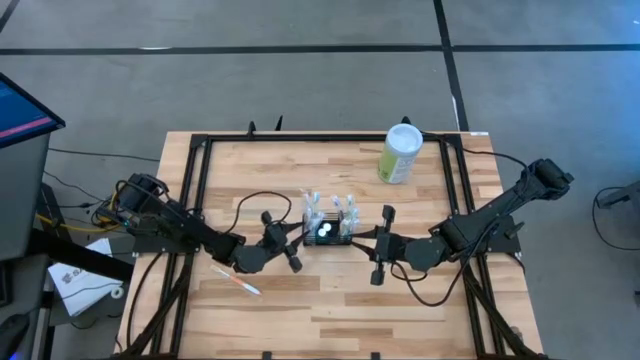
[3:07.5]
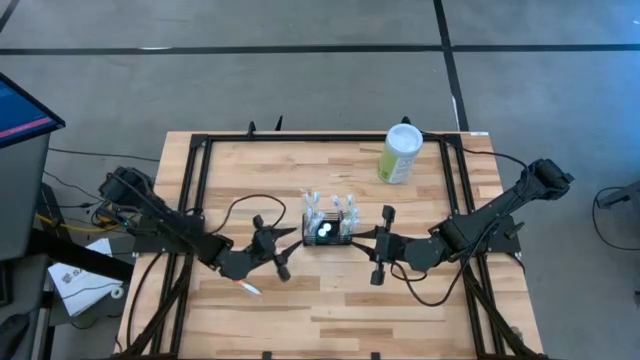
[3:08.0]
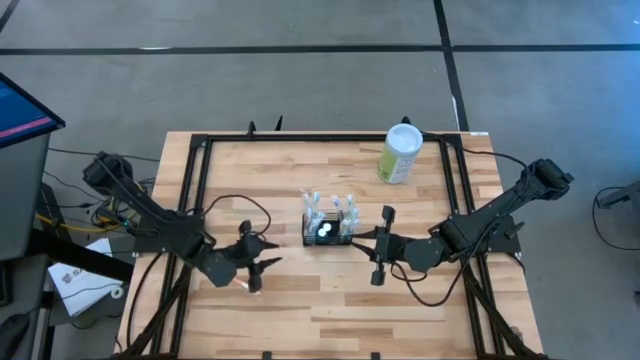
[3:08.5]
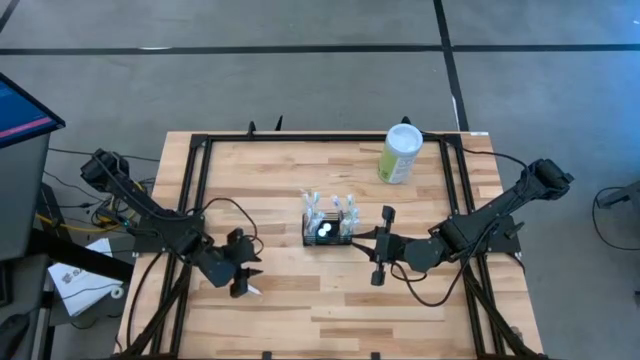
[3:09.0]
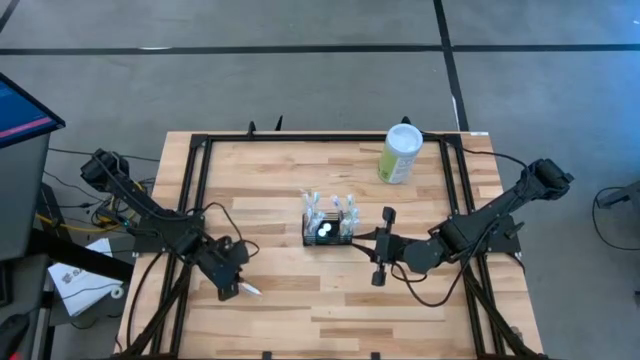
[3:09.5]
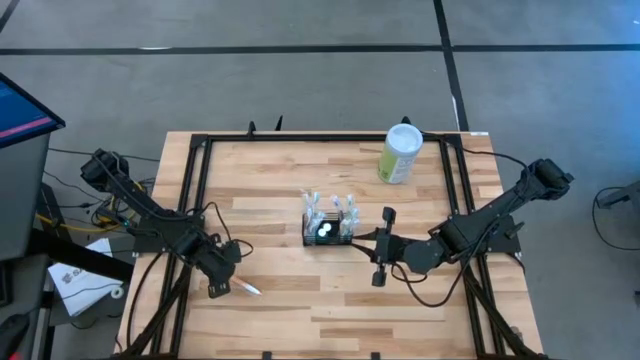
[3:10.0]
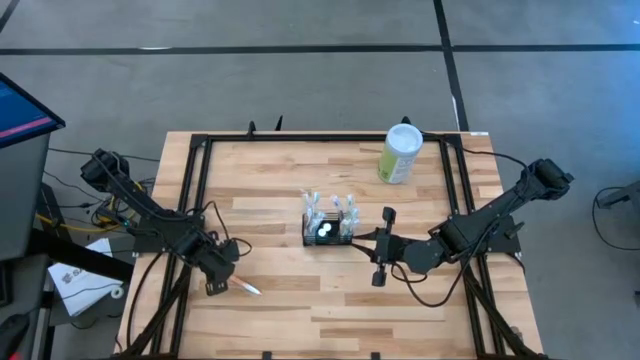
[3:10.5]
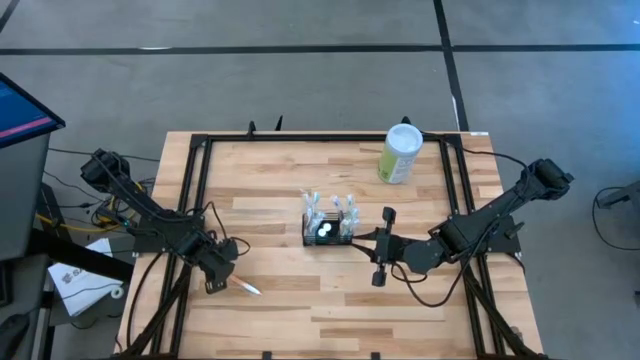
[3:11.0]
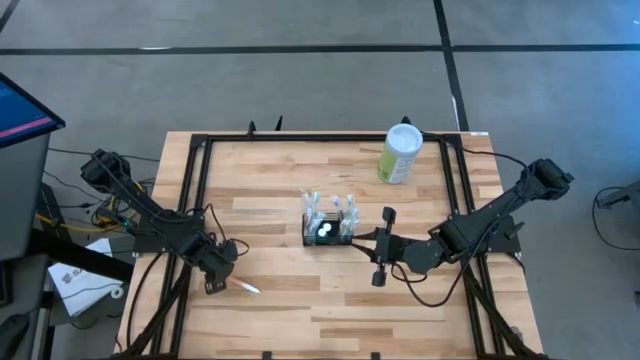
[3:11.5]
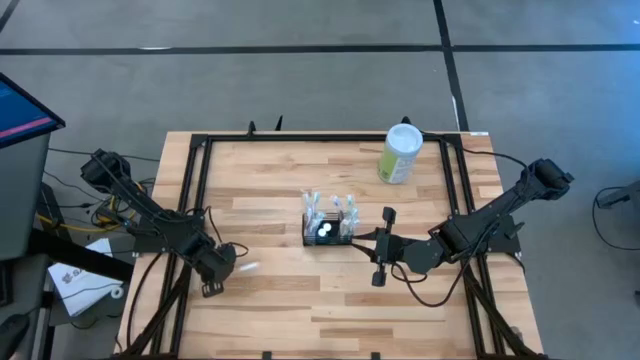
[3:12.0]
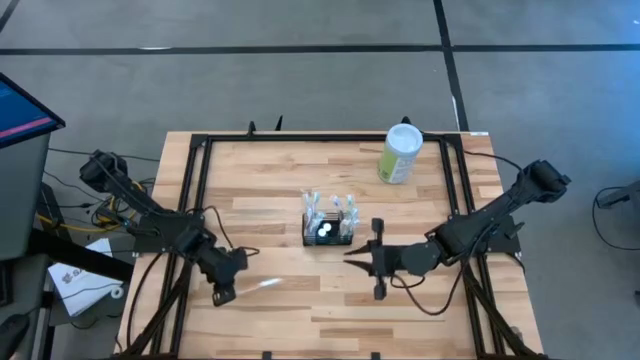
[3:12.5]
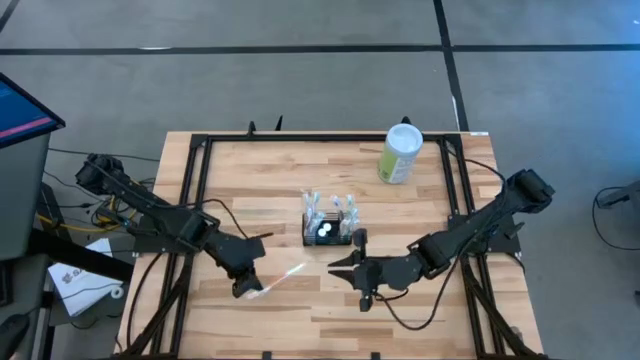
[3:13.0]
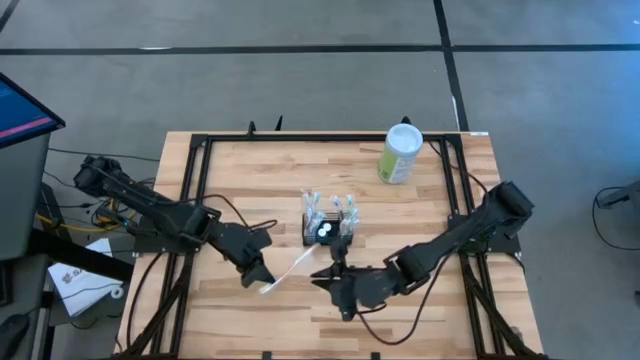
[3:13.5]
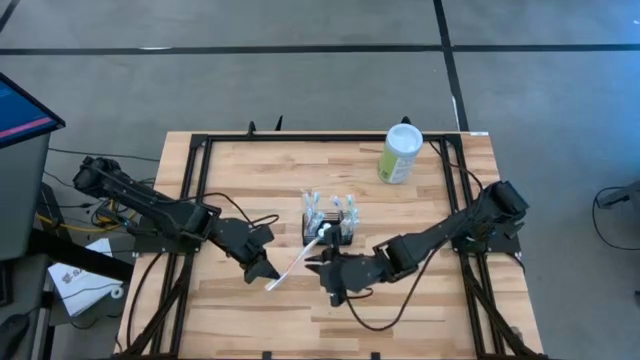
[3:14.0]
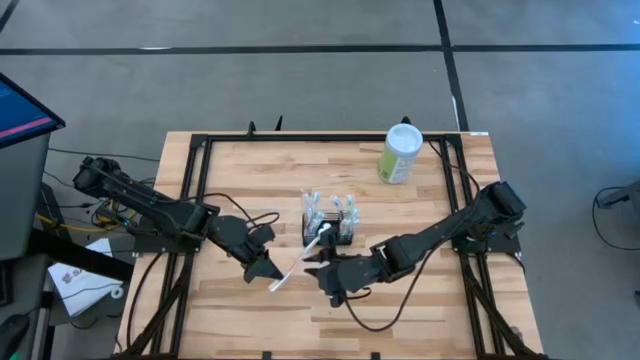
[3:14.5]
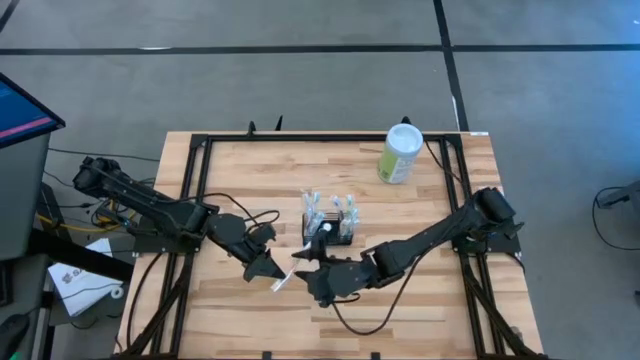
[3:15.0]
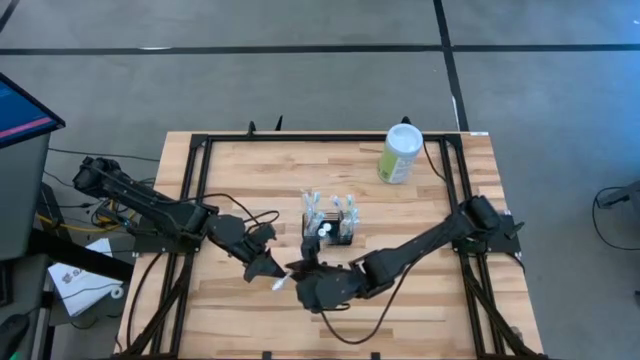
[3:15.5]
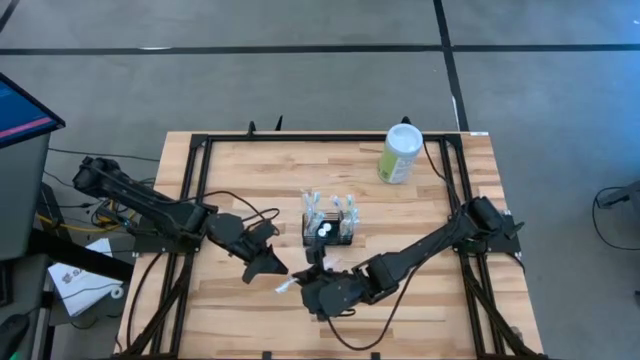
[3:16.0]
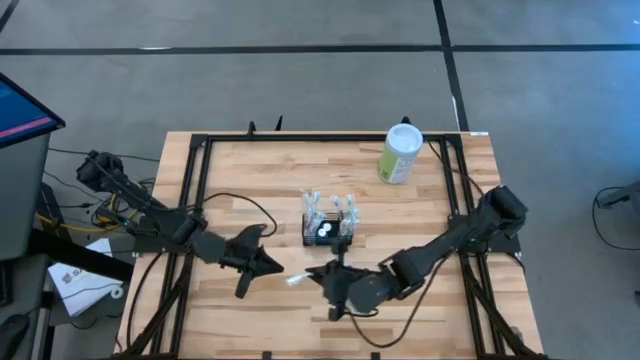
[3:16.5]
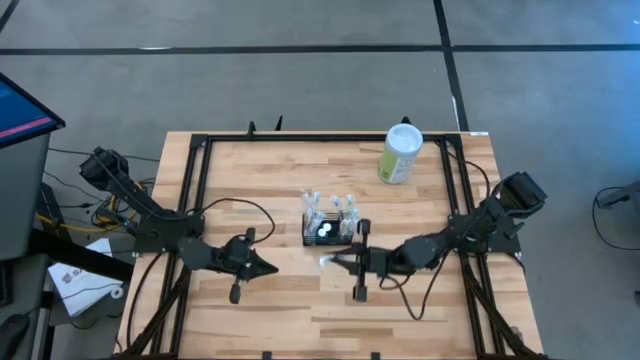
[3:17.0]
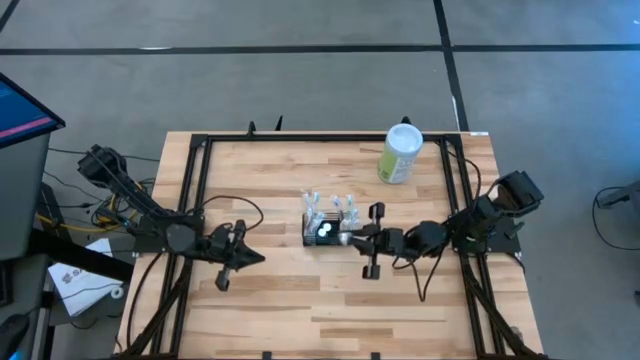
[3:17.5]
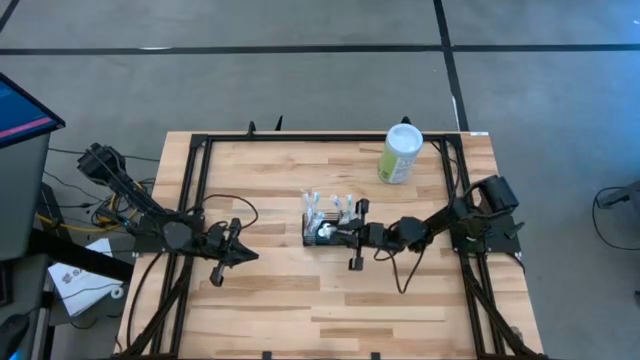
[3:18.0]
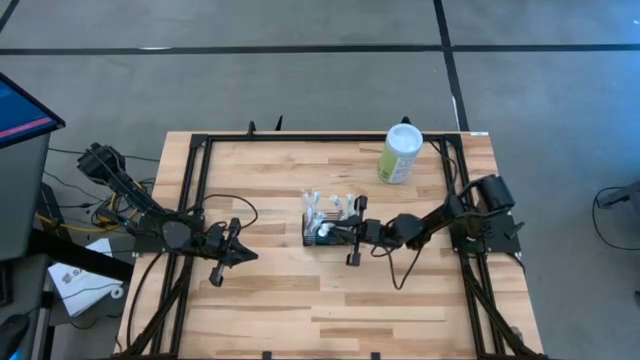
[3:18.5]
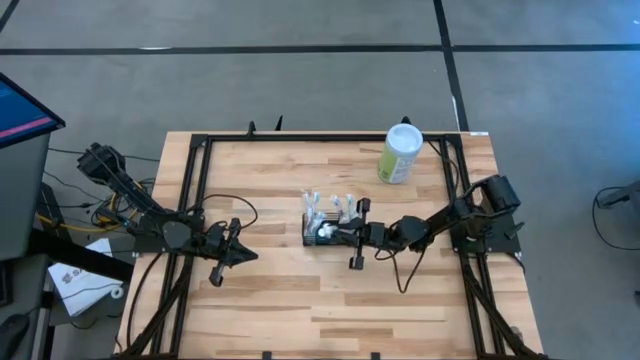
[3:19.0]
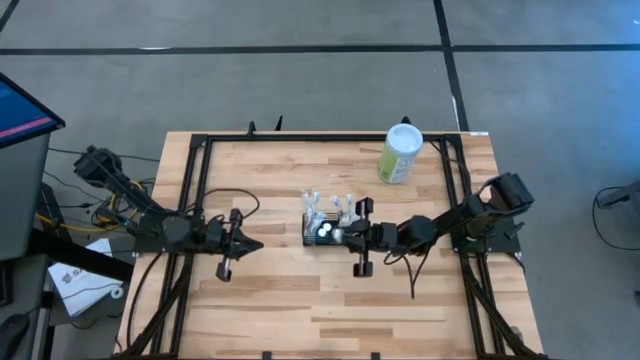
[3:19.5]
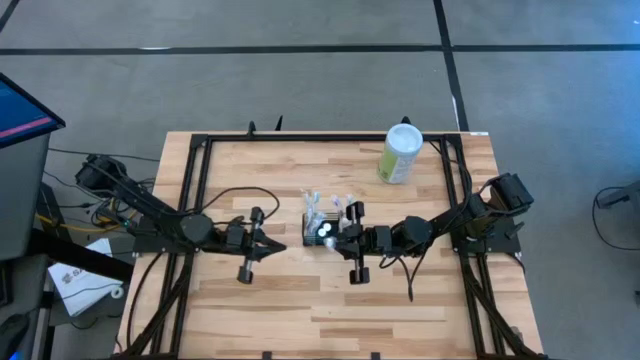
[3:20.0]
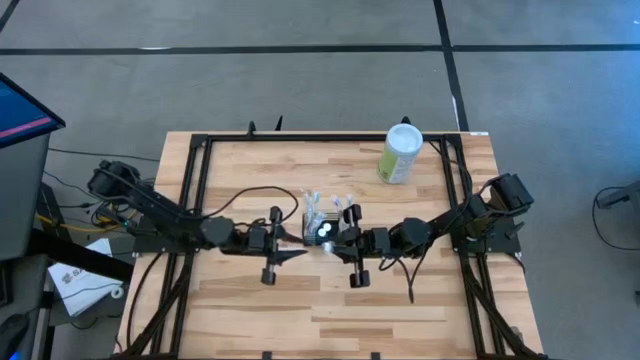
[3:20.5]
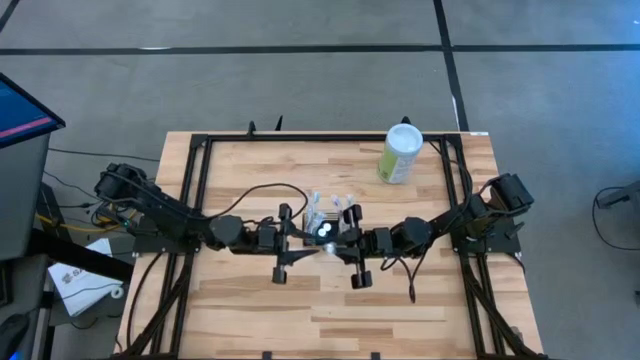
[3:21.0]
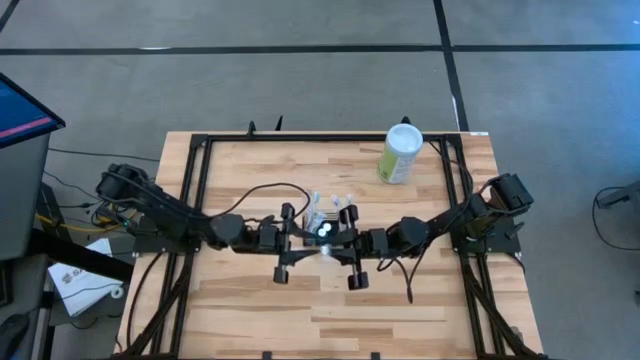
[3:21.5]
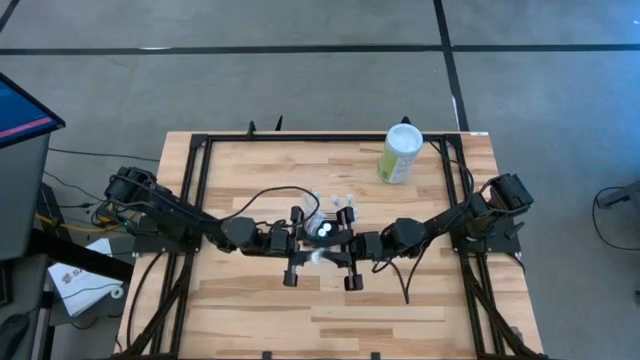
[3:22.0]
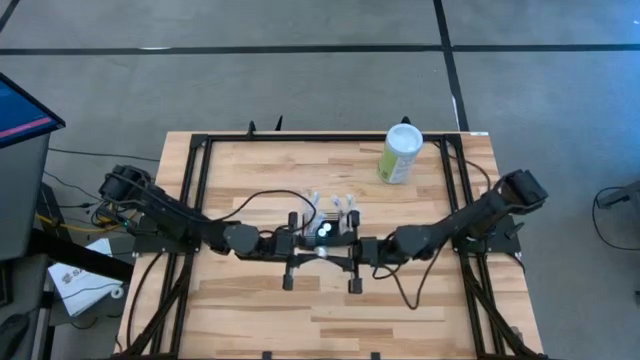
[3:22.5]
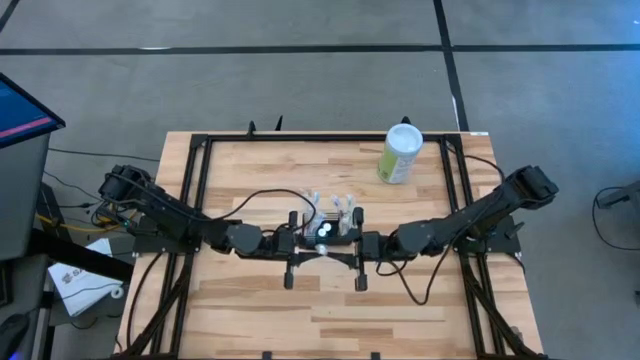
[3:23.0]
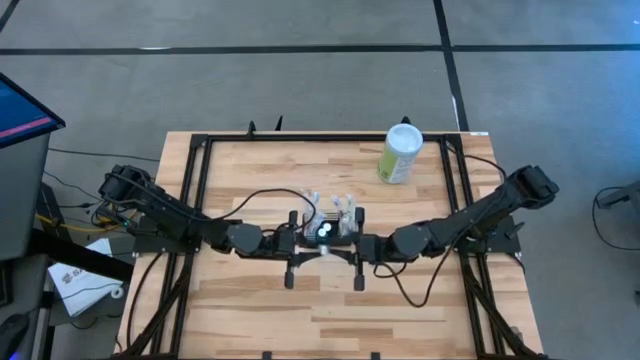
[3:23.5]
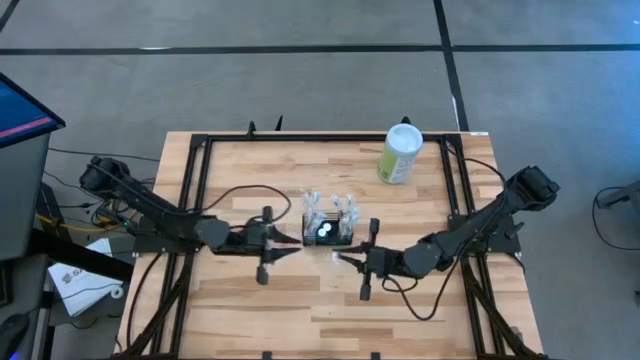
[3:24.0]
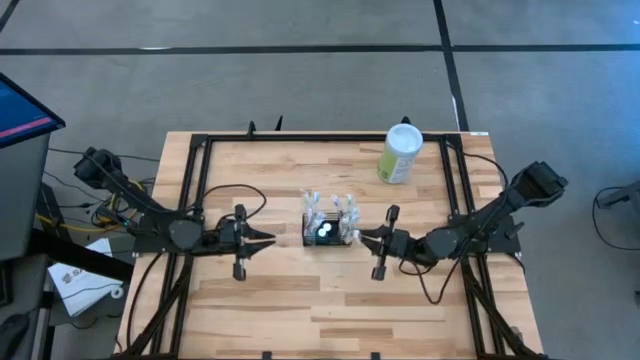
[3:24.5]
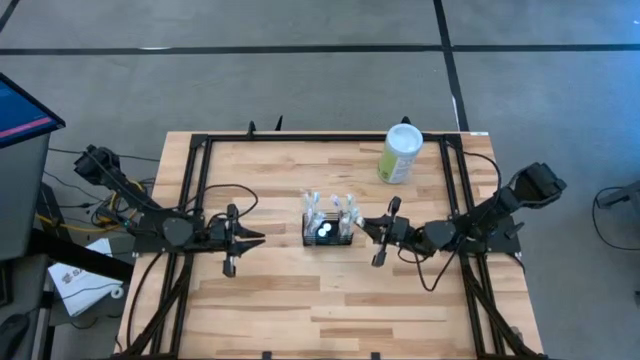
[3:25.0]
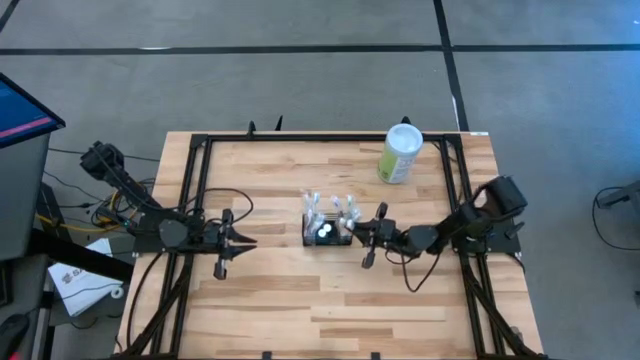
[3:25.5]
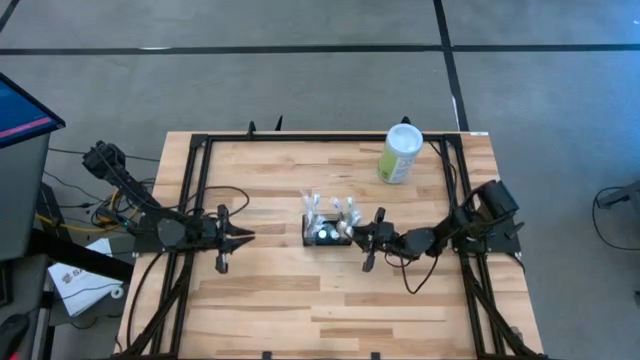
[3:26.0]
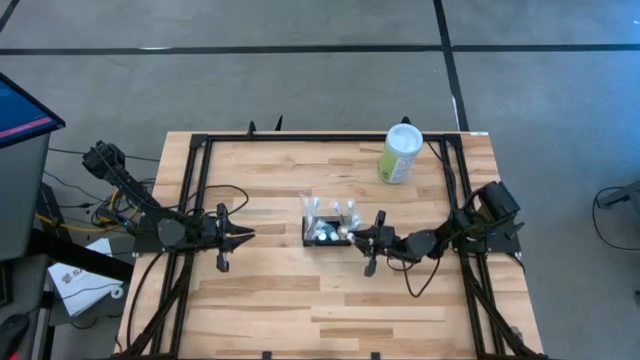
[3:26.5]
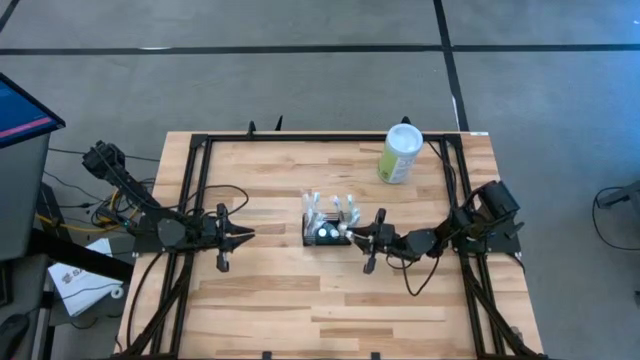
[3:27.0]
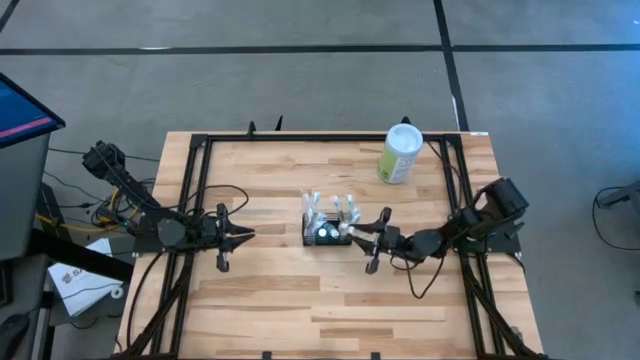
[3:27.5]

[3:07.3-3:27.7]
Task: Pick & Place toothbrushing station
Put the orange toothbrush into the right compartment of the organizer

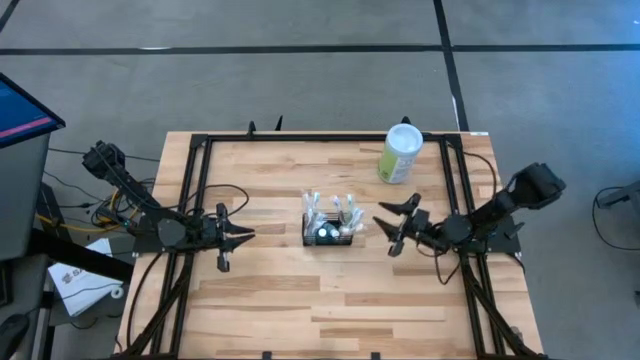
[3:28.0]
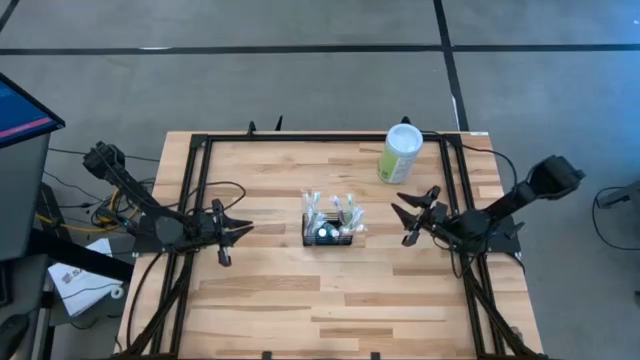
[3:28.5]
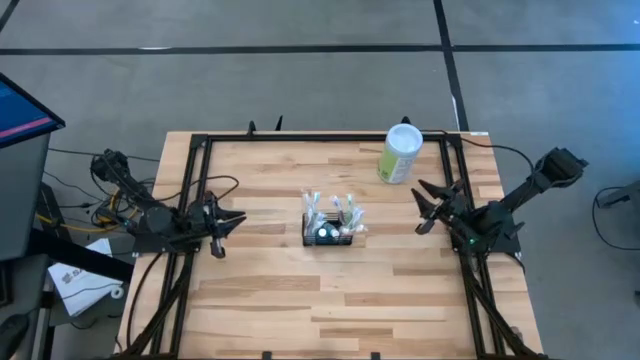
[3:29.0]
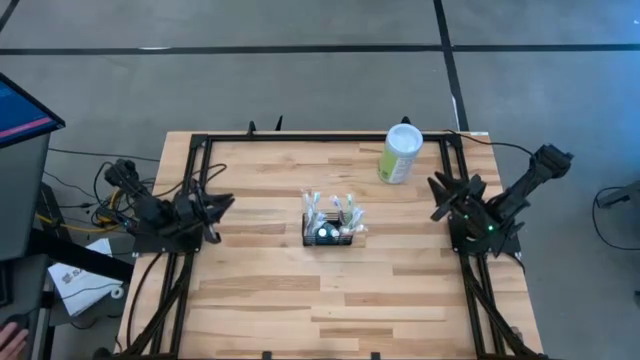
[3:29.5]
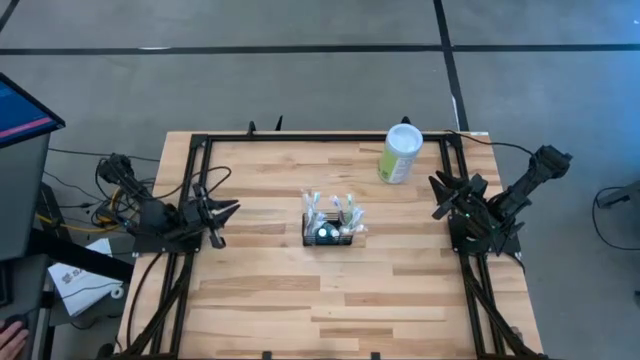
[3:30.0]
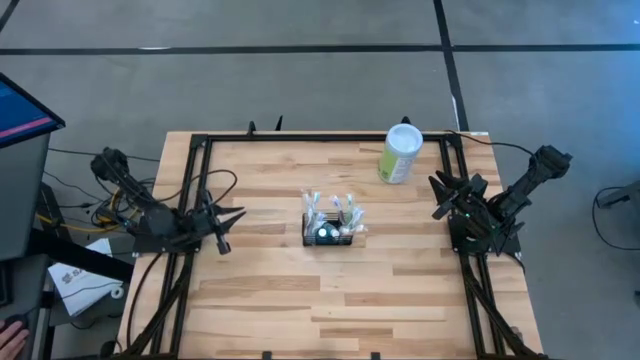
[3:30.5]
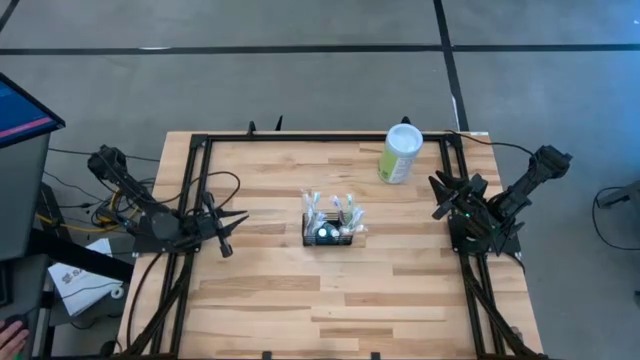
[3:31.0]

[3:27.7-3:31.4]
Return to Home Position
